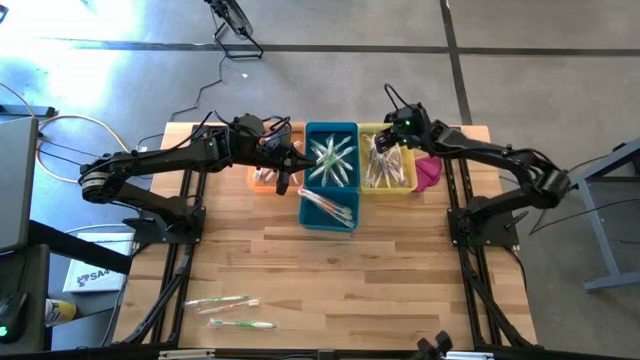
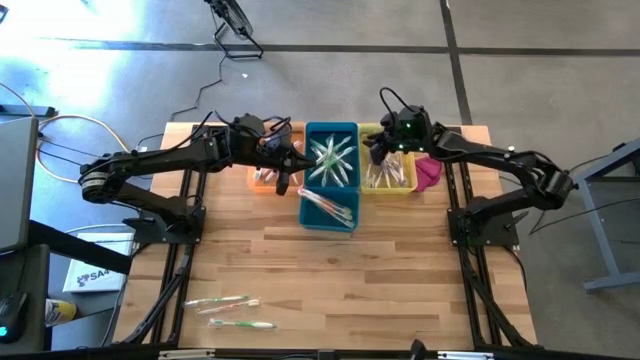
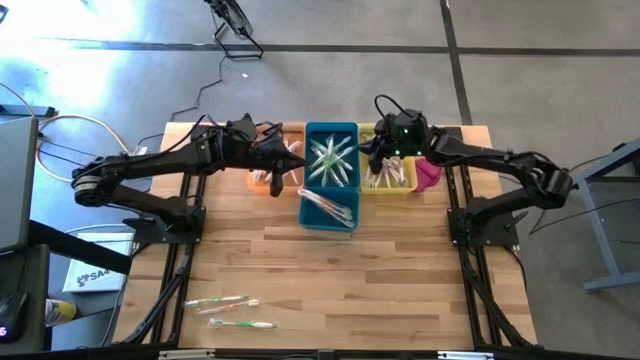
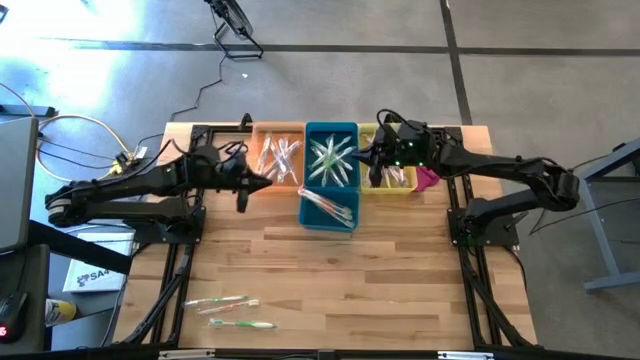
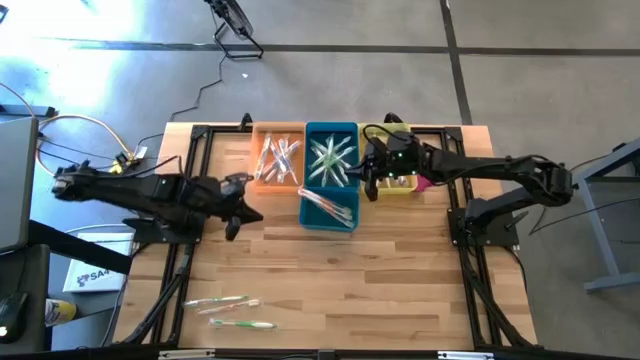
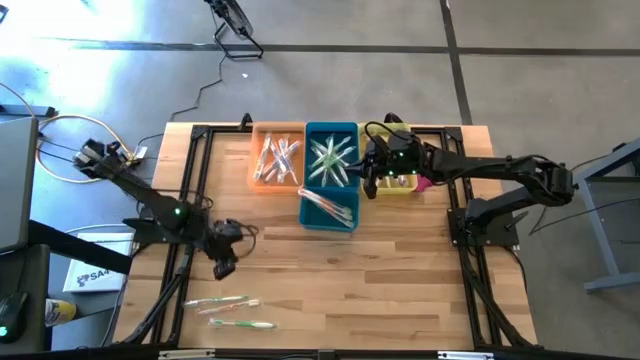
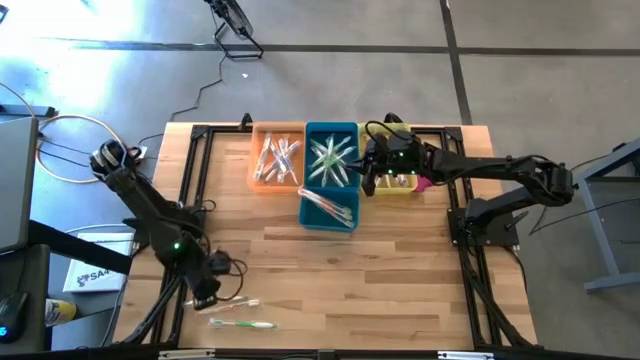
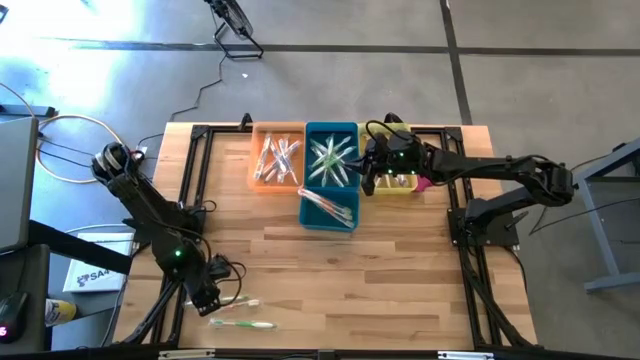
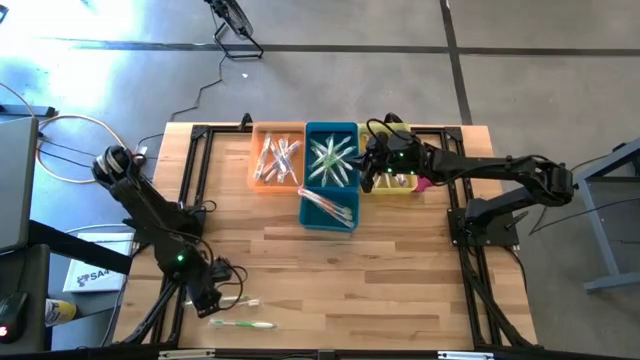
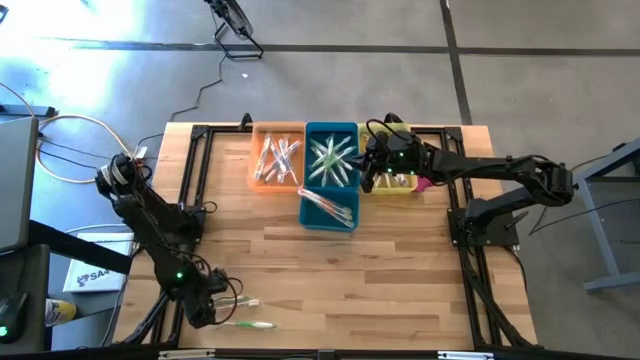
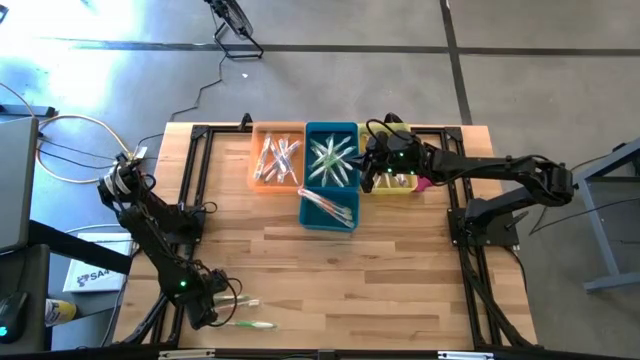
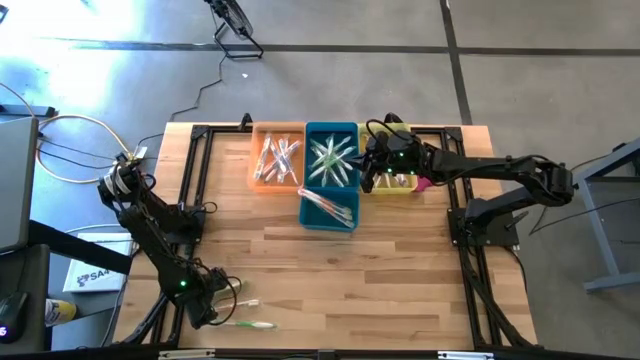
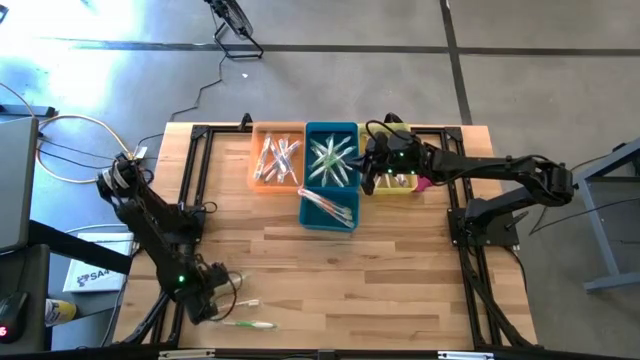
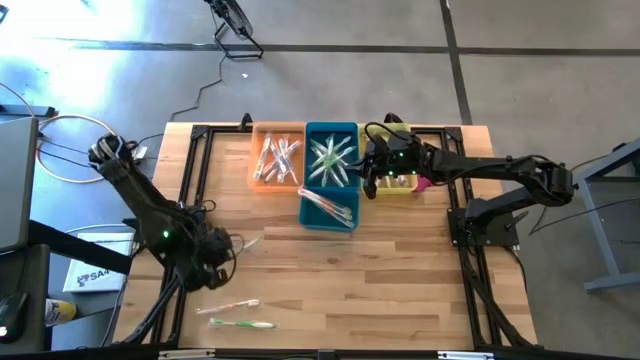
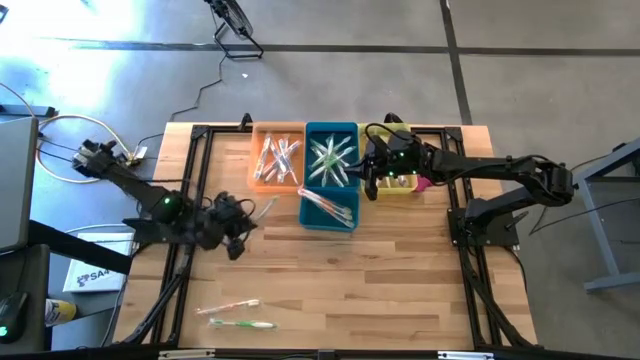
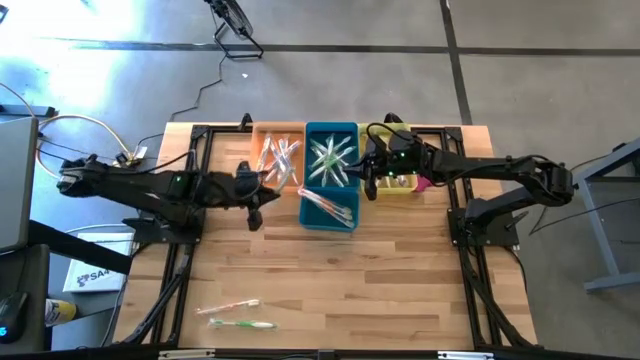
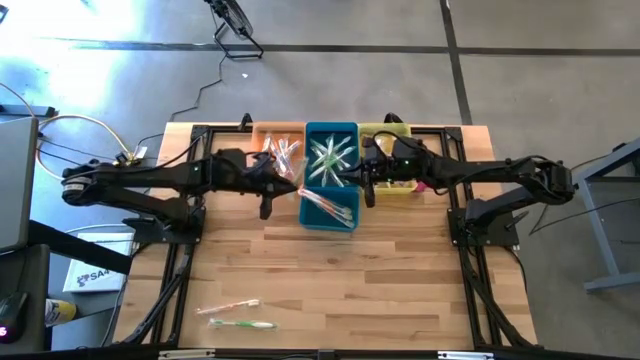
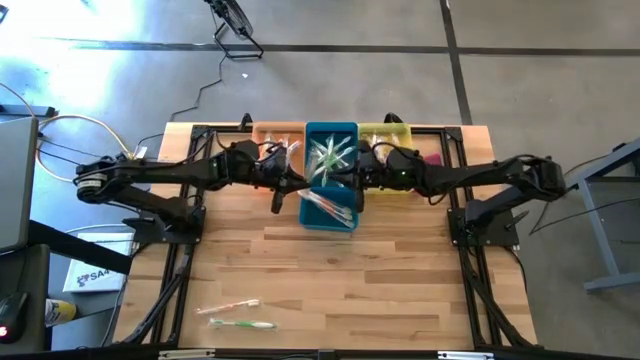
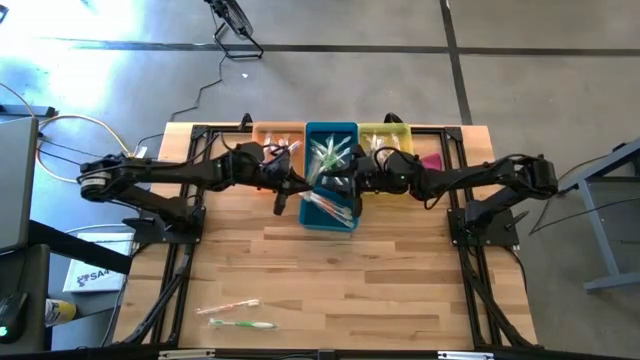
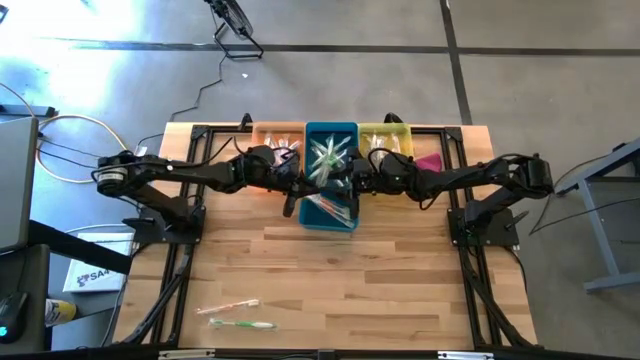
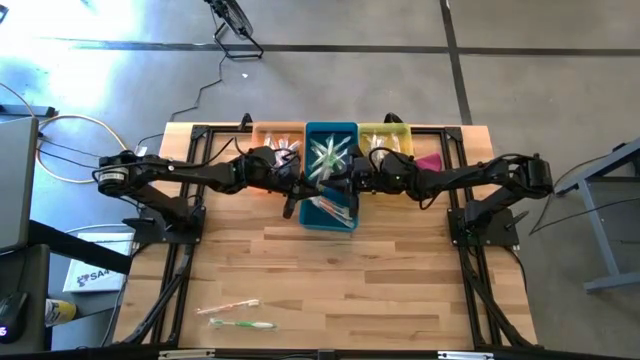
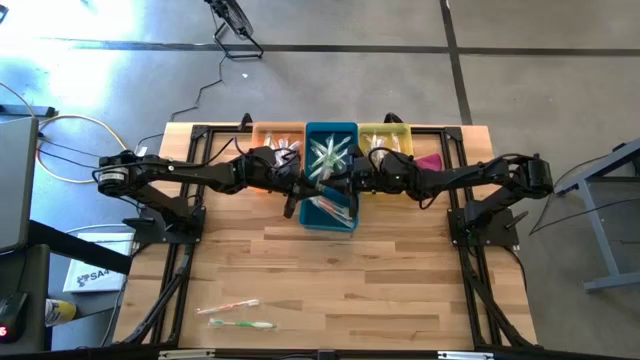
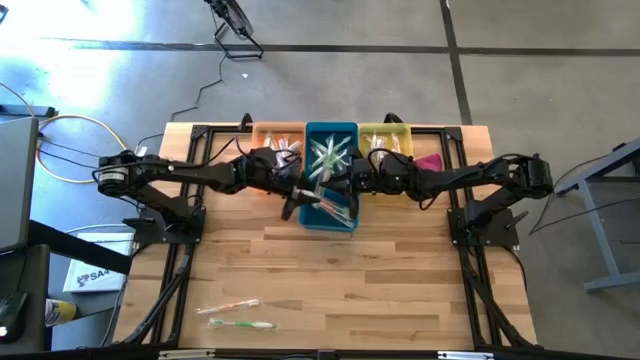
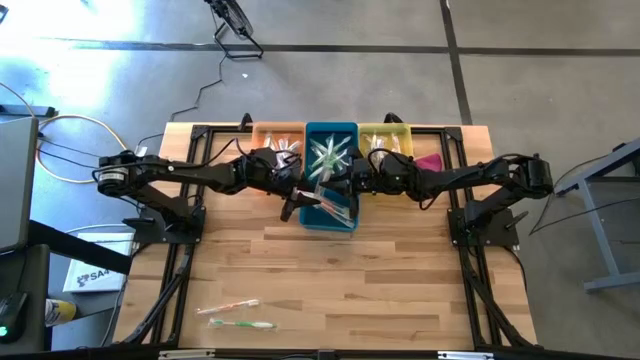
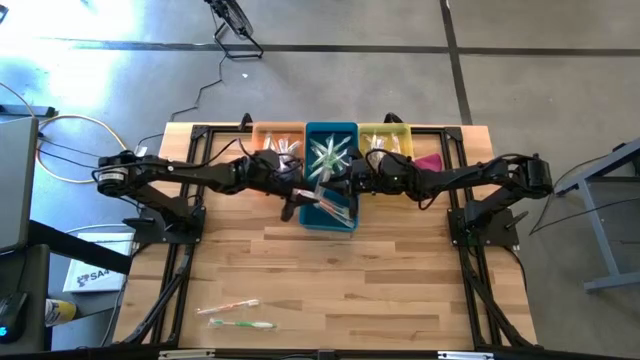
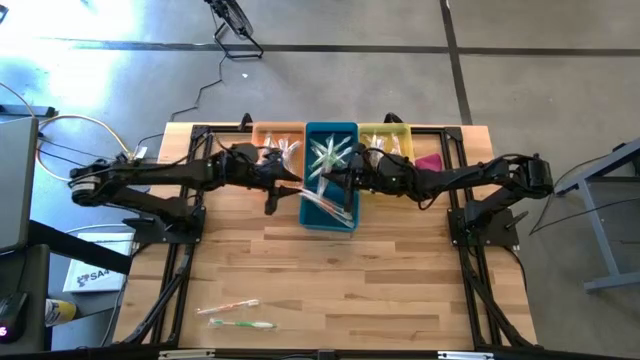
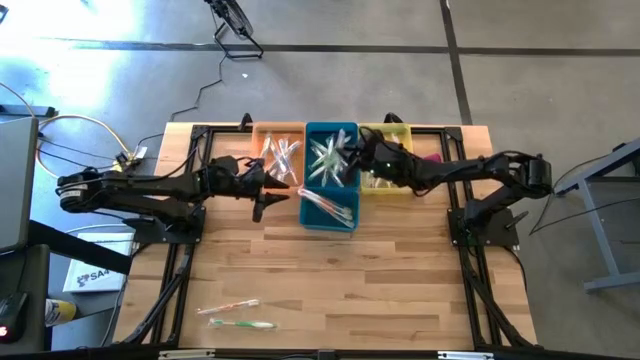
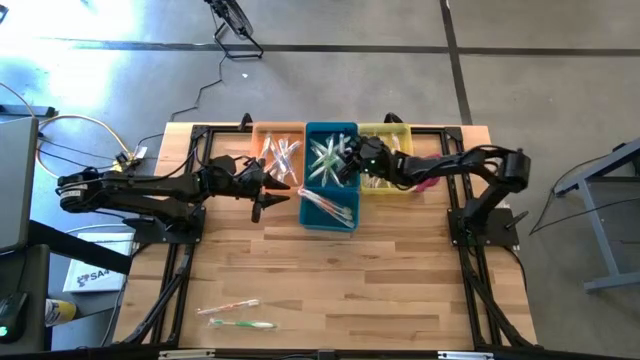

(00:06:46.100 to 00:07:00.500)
Task: Pick & Place Toothbrushes
Put the green toothbrush into the top blue bin

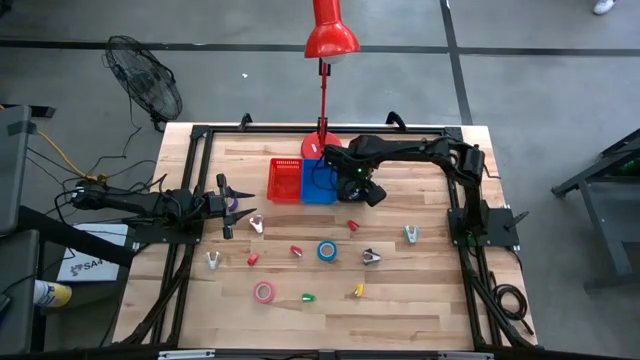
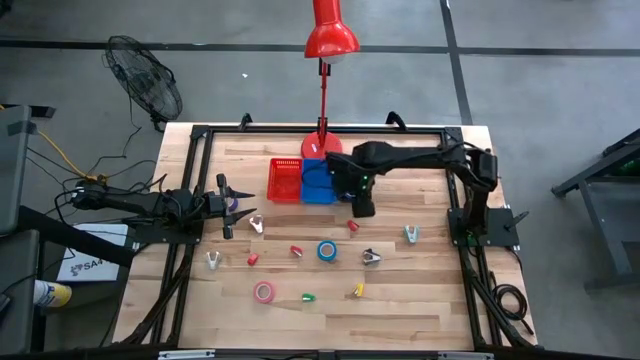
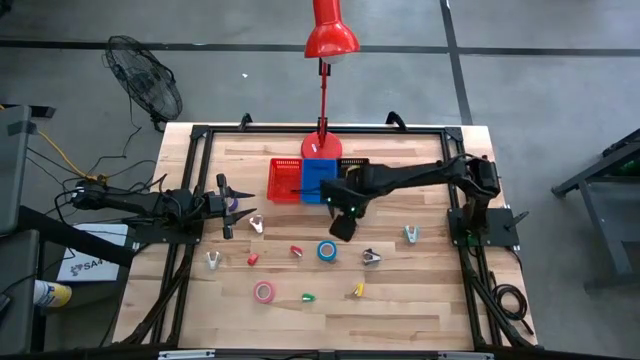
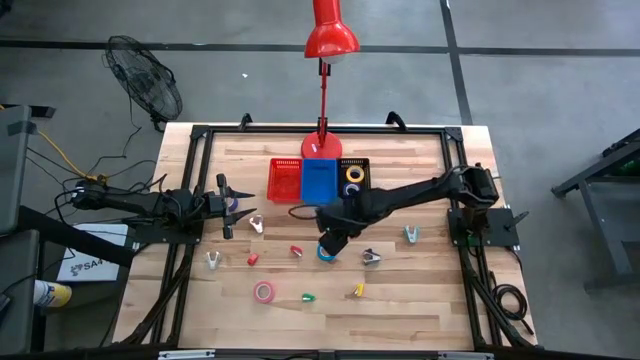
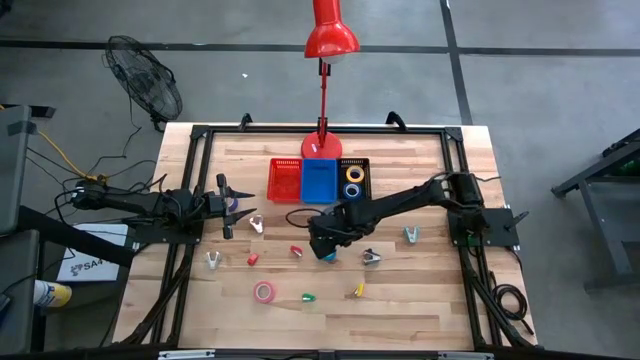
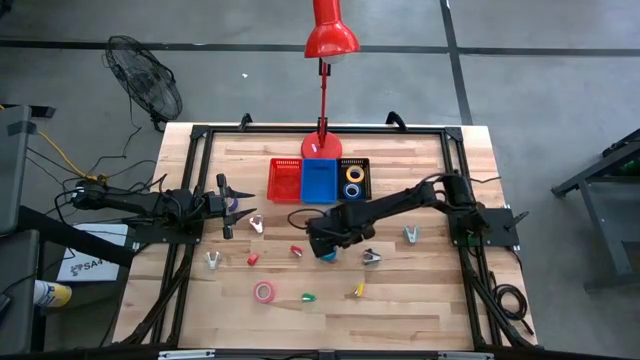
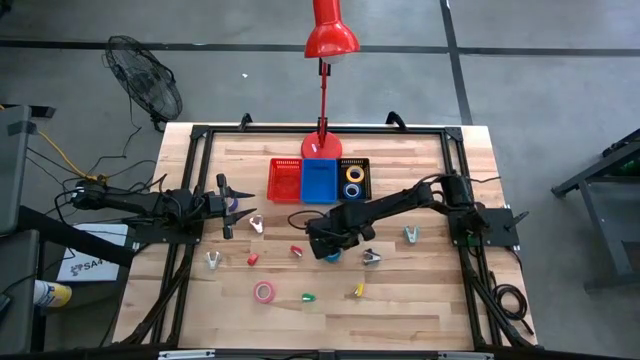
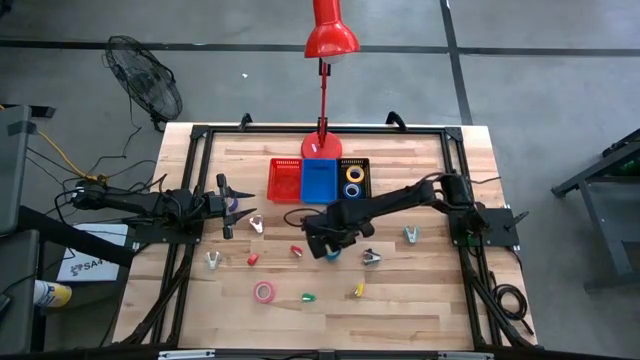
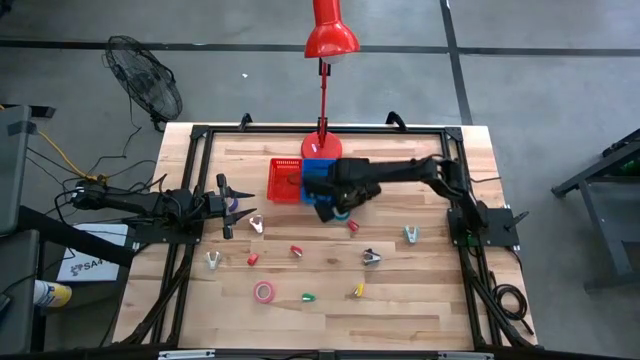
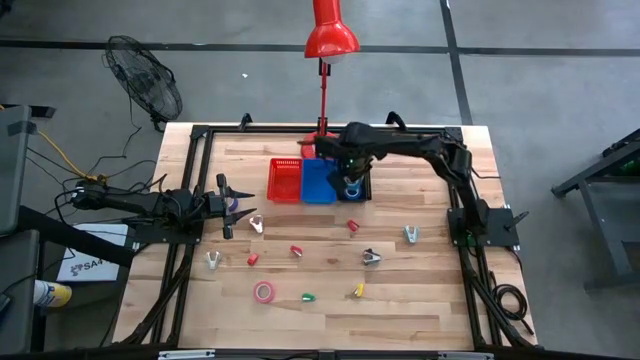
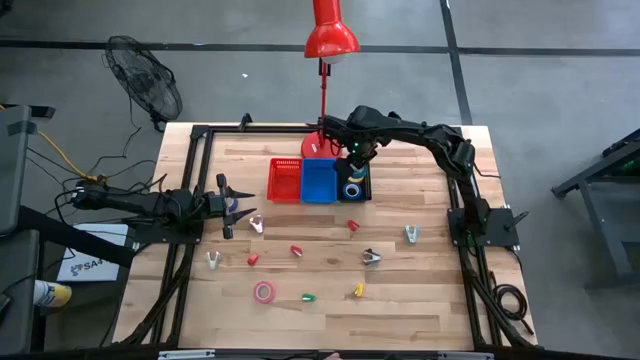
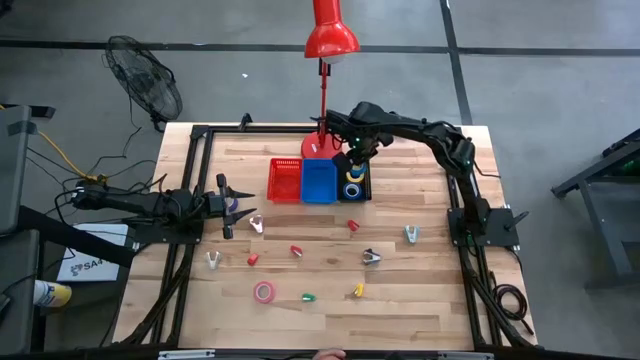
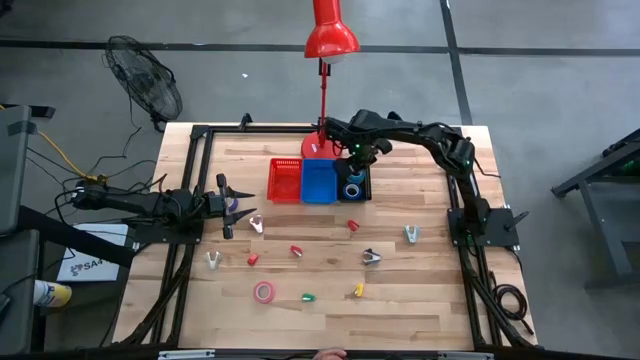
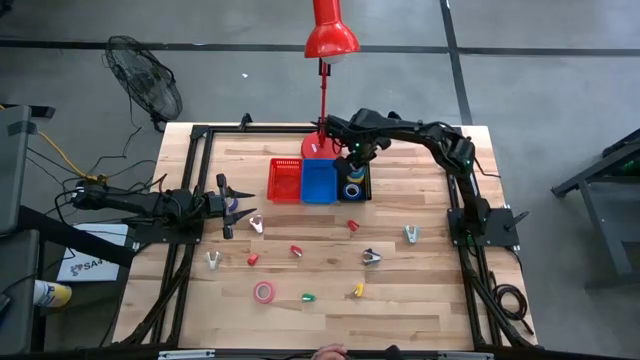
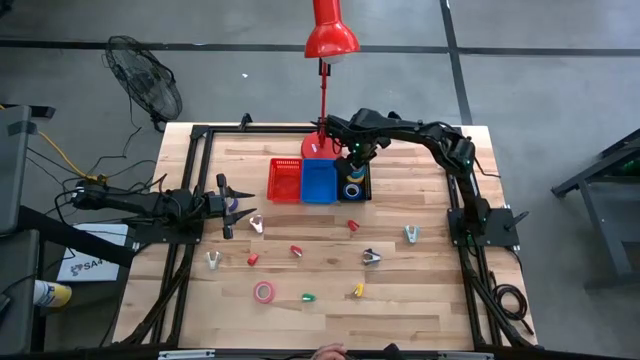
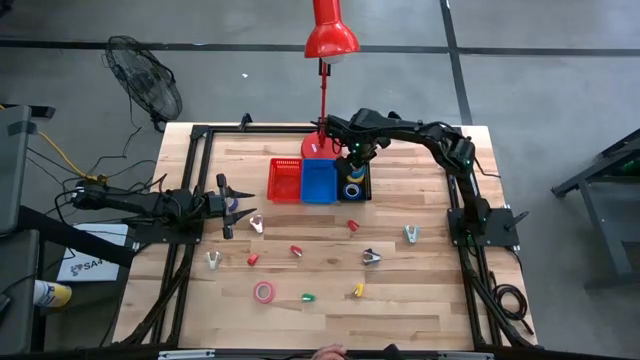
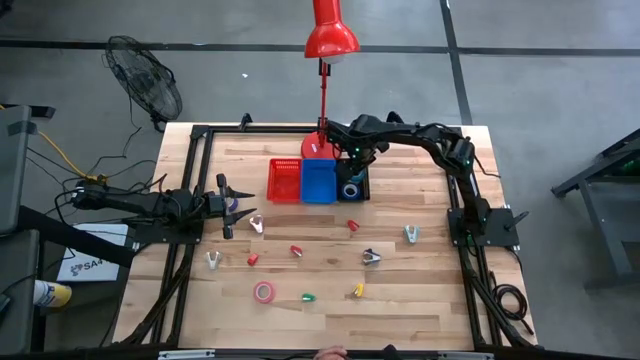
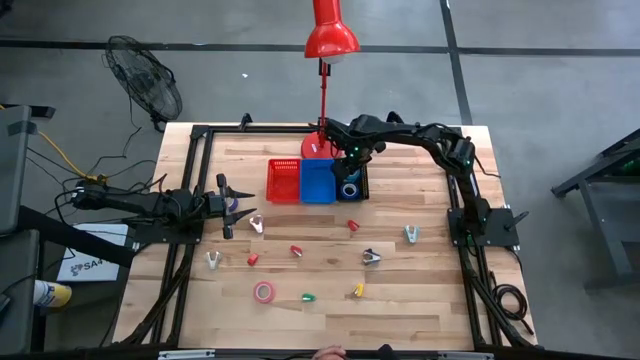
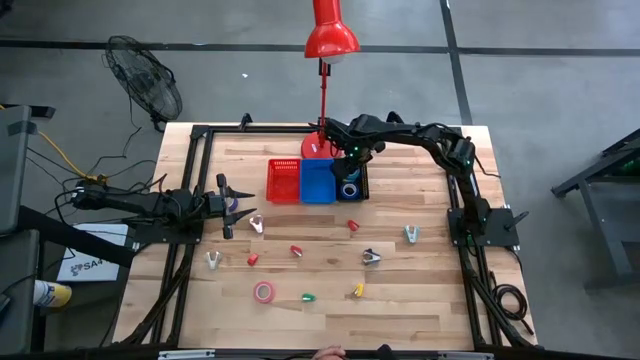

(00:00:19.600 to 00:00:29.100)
Task: Pick and place Stapler, Stapler remover, tape
Put the light blue tape into the black basket
